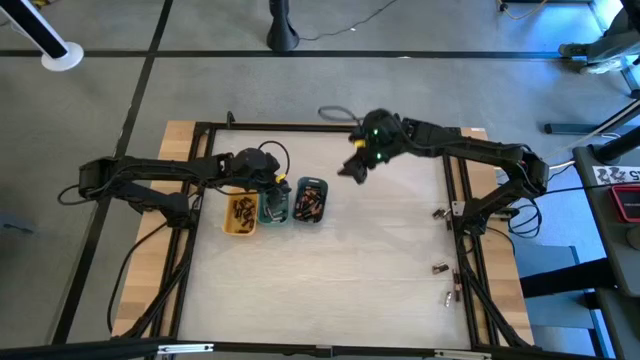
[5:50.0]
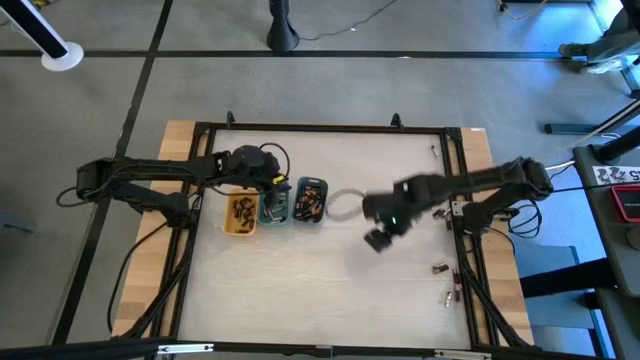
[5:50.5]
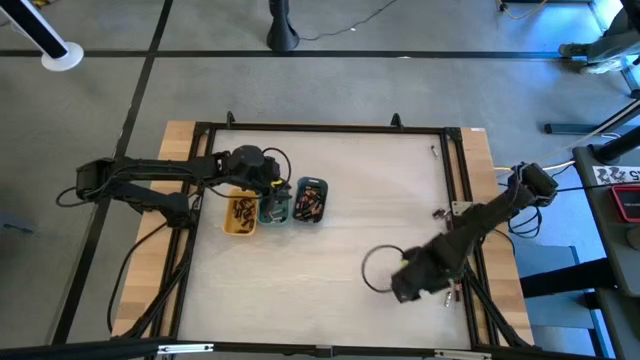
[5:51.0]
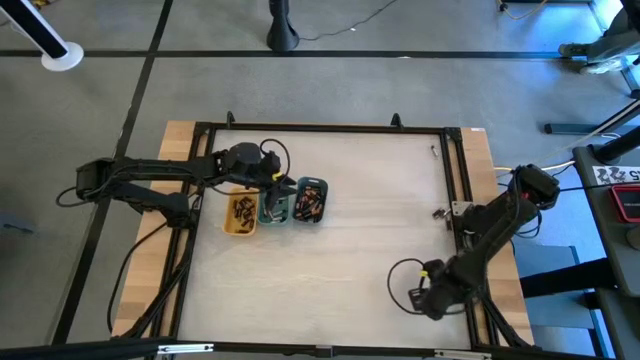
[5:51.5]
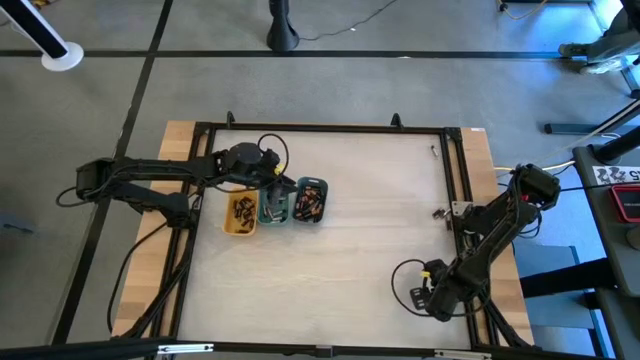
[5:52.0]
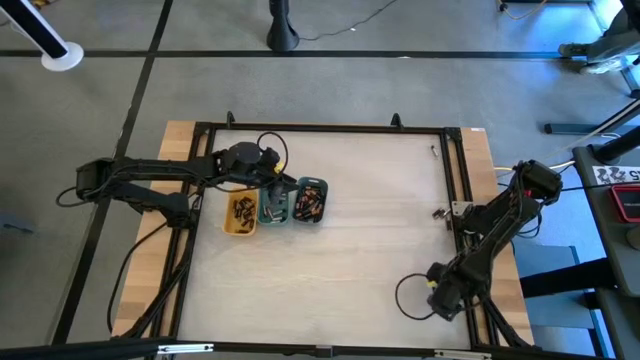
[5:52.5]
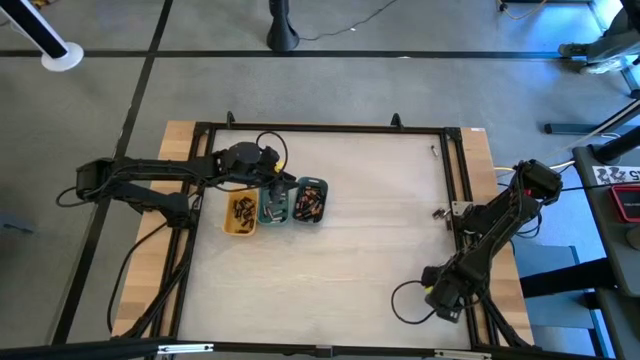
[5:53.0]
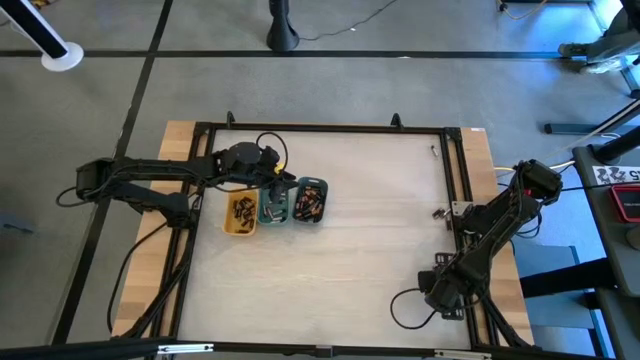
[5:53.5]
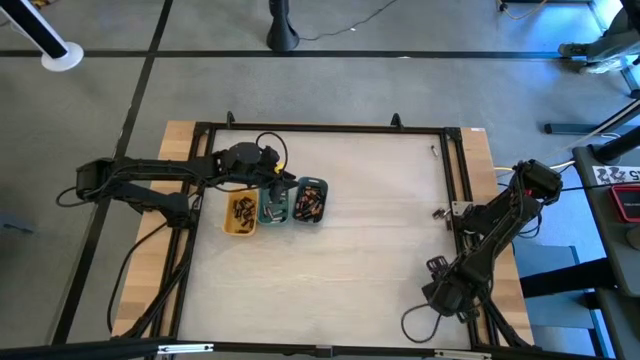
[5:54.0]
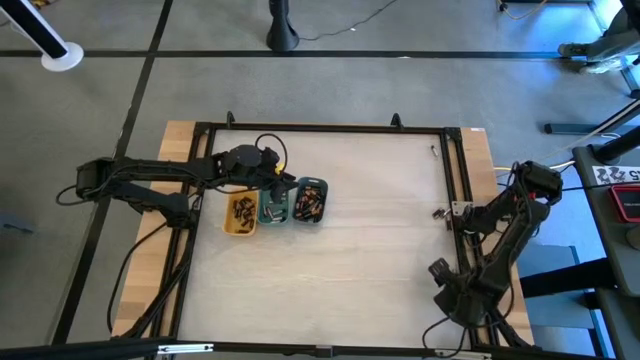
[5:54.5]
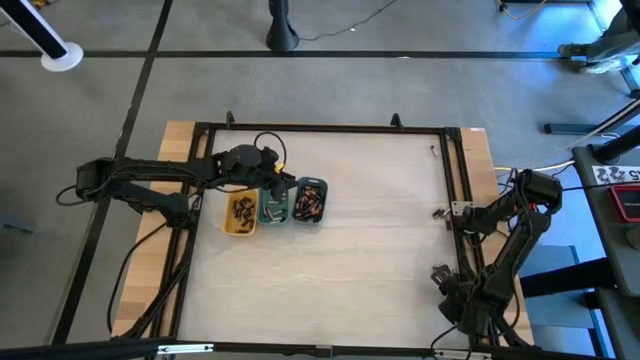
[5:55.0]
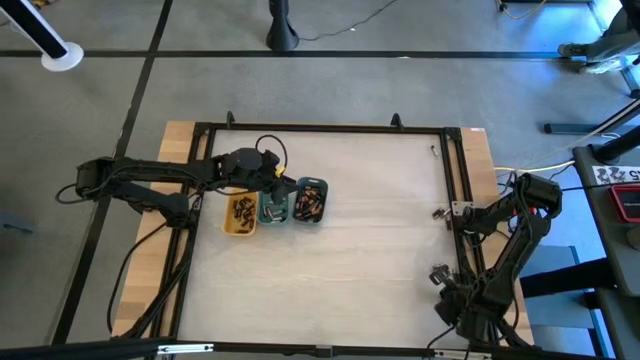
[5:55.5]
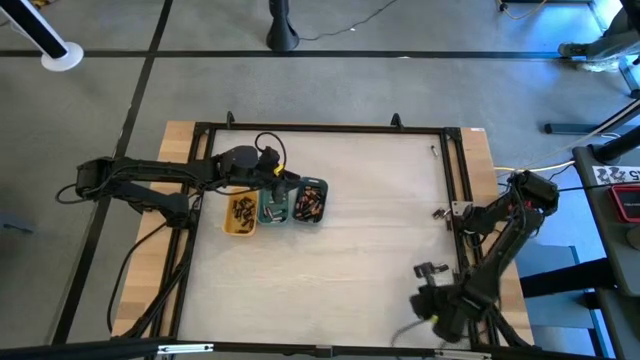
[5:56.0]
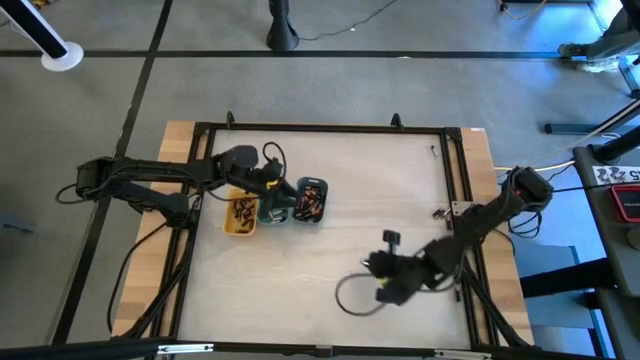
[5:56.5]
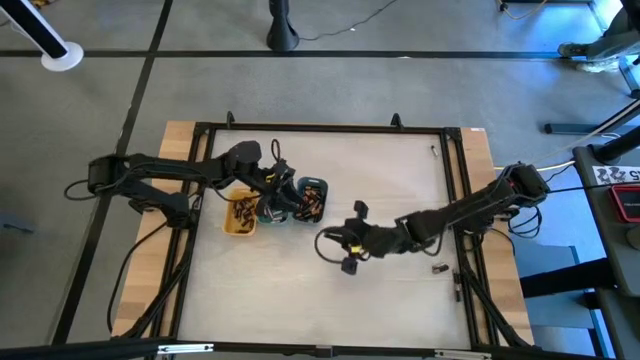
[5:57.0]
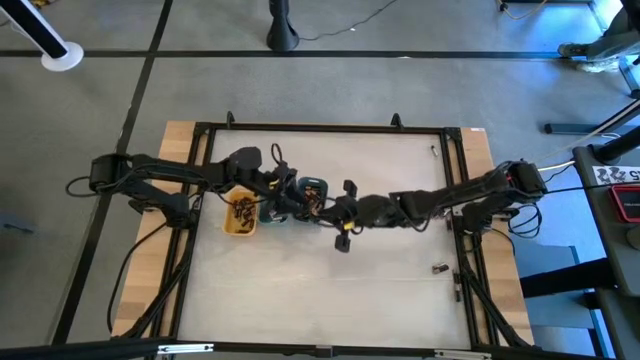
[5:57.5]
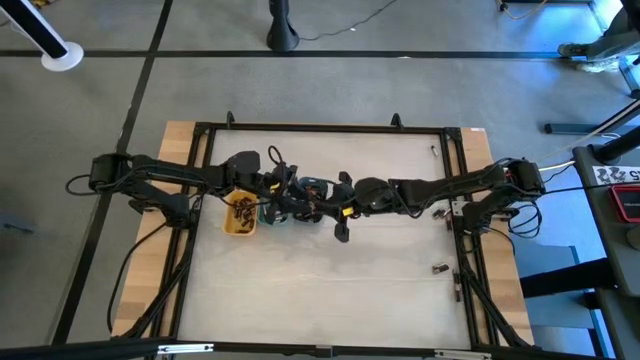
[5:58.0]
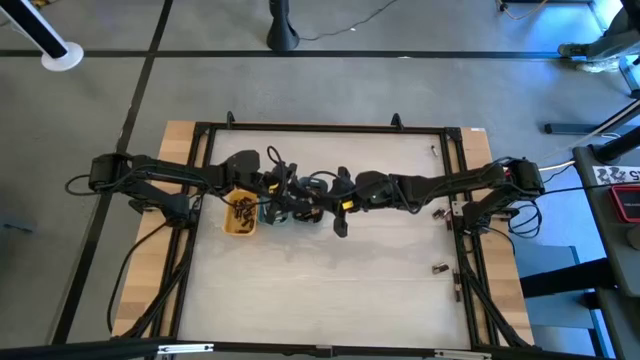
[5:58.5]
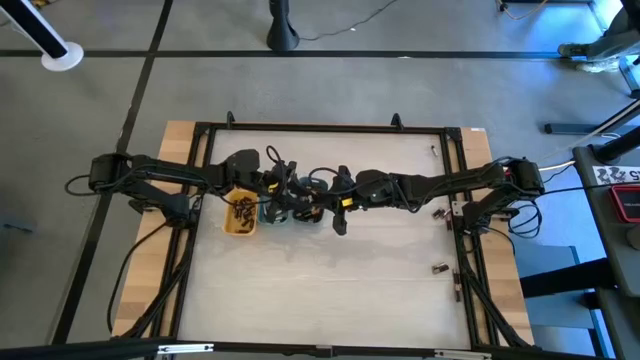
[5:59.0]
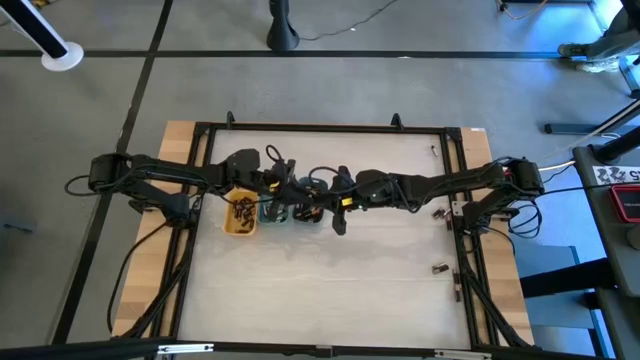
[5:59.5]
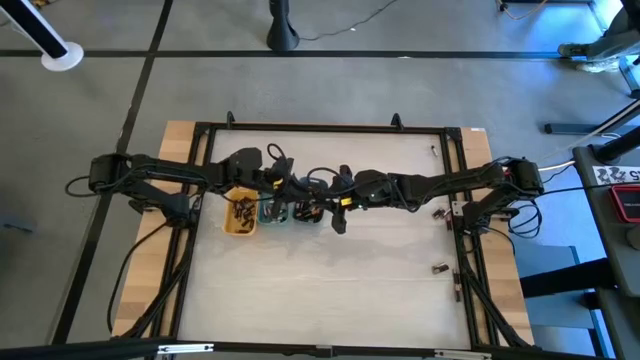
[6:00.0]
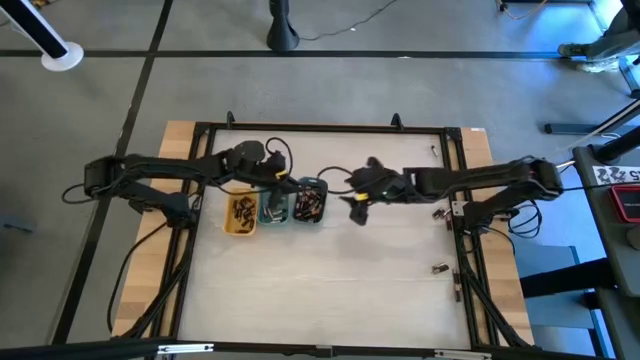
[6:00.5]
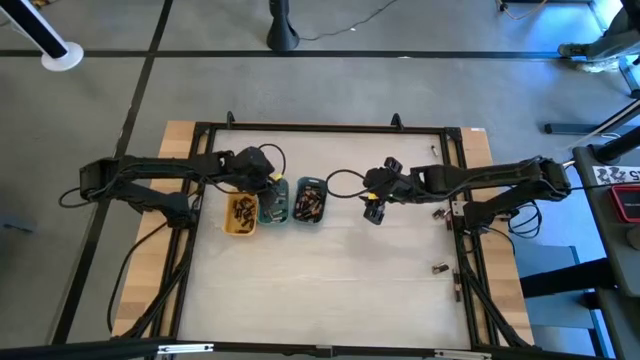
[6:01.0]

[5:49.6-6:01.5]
Task: Sort batteries
Put the silver battery into the green bin

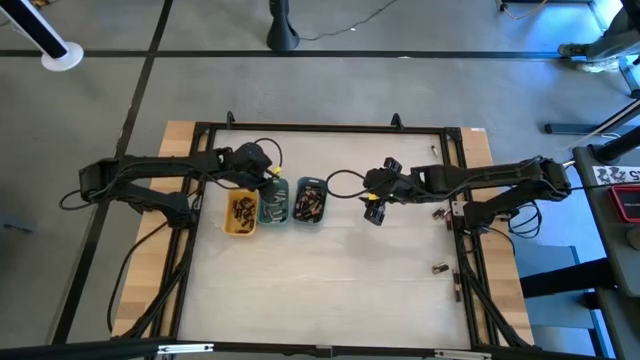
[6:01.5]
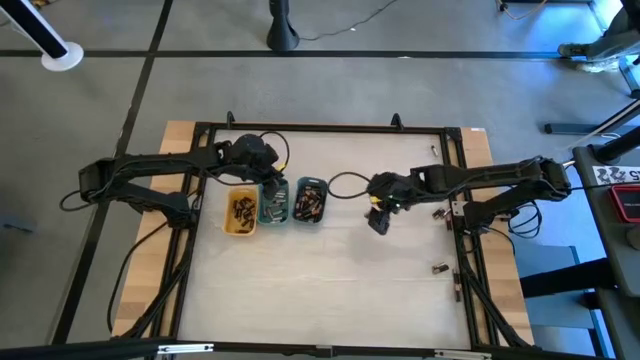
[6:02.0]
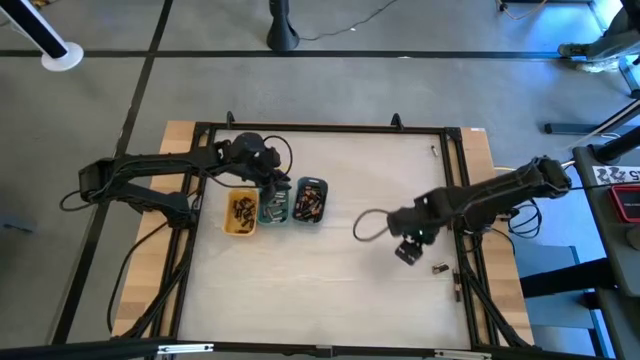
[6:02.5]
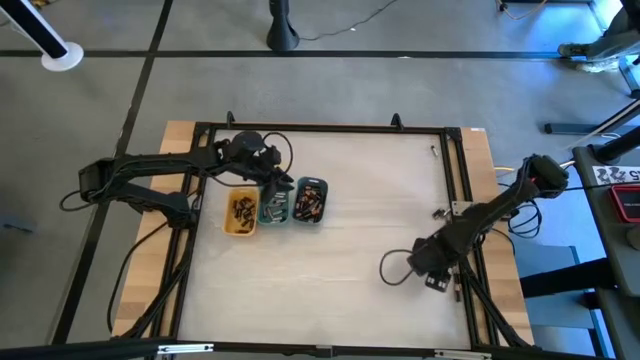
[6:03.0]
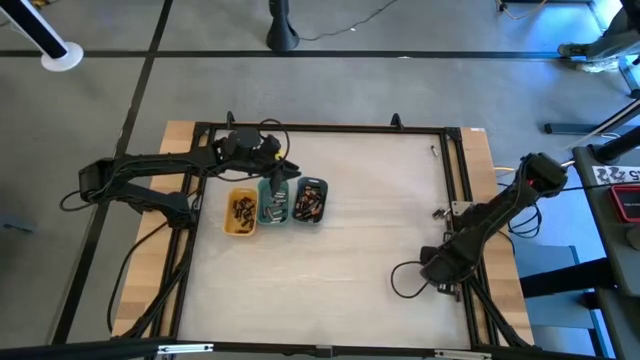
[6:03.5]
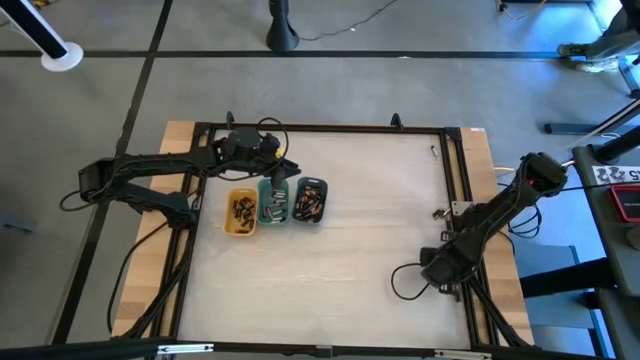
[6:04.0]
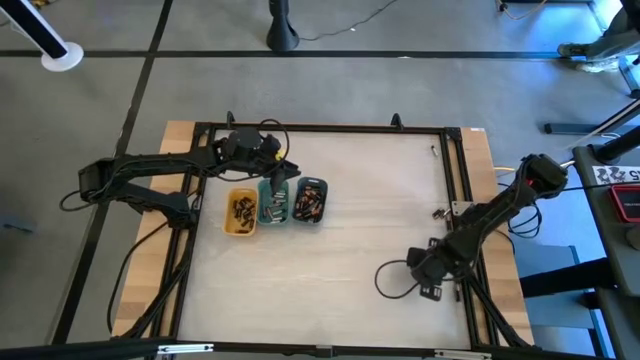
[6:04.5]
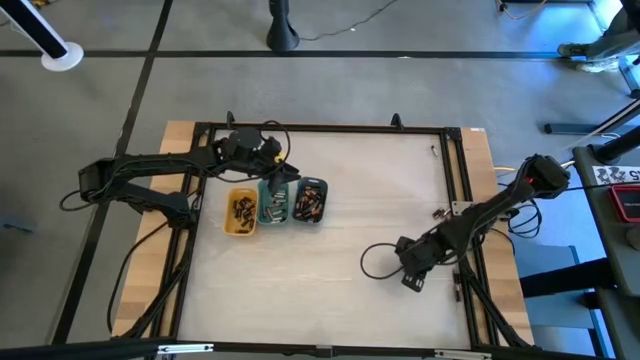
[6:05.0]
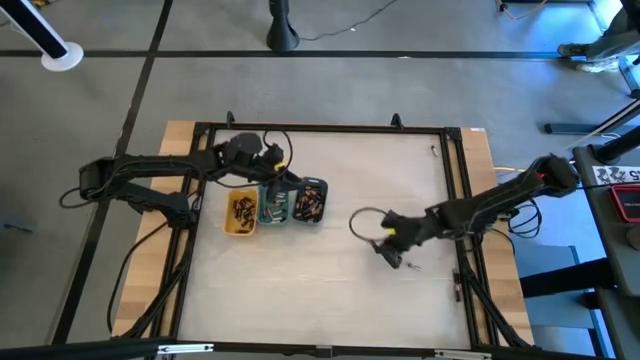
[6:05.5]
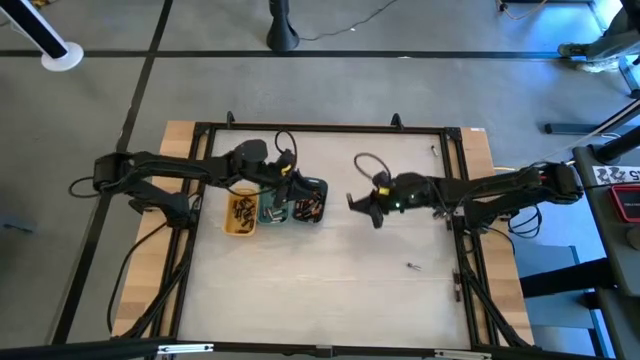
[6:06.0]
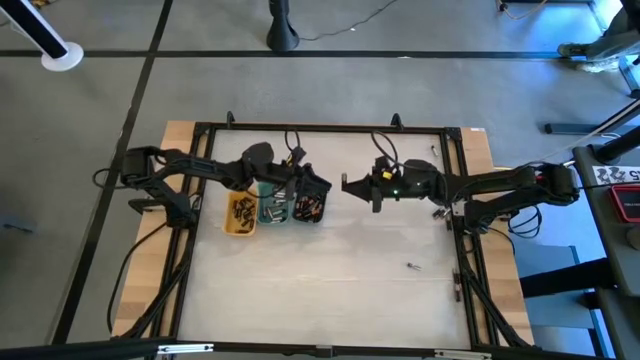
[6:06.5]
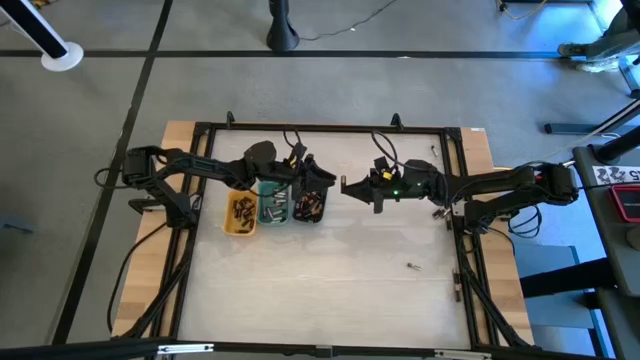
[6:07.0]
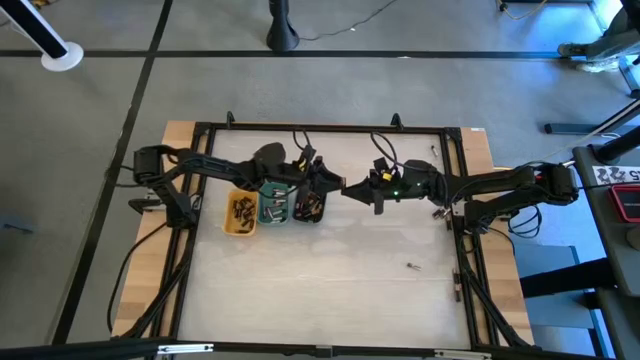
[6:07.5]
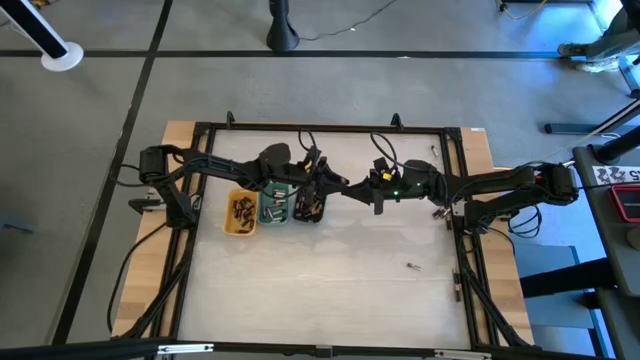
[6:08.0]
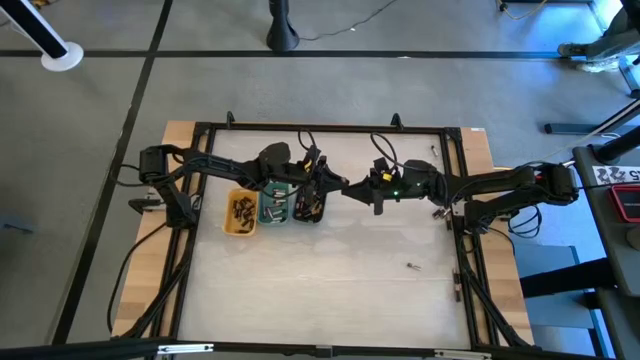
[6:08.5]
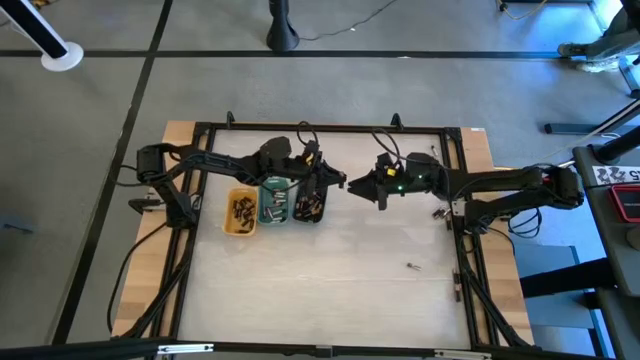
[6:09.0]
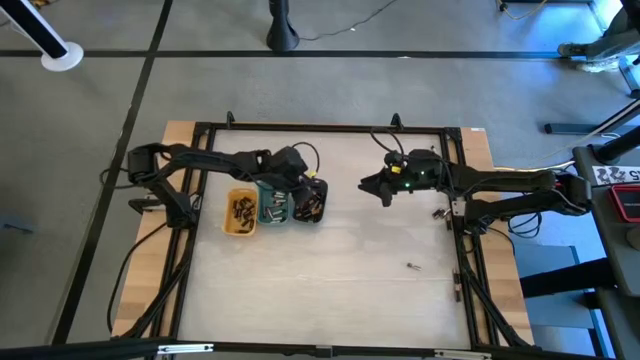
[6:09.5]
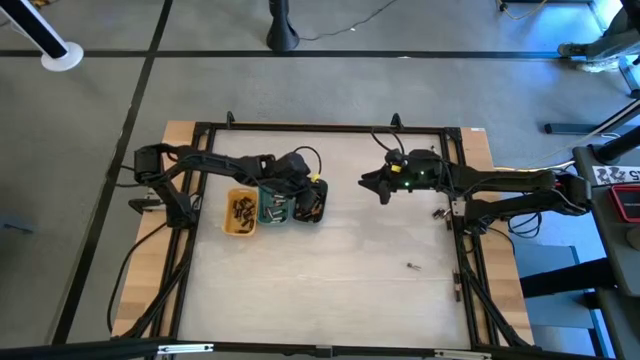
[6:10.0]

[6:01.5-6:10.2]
Put the large black battery into the blue bin
